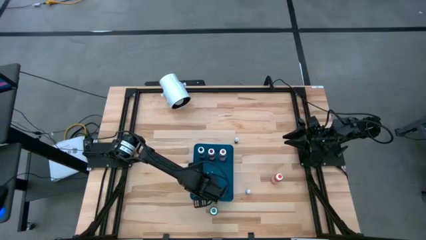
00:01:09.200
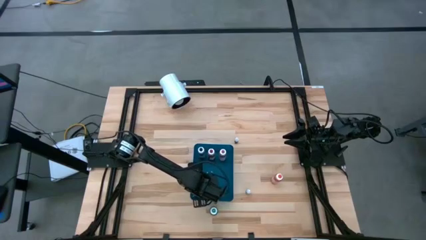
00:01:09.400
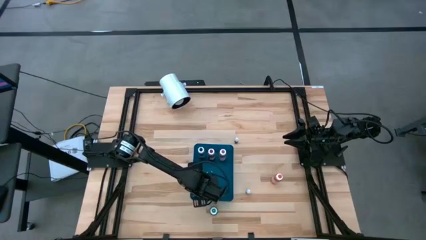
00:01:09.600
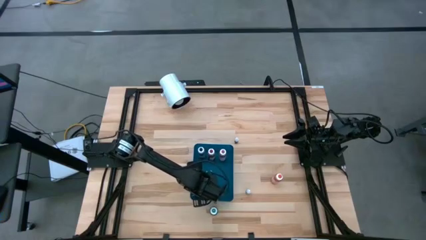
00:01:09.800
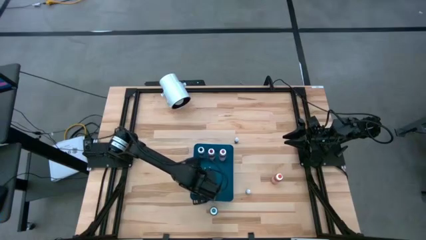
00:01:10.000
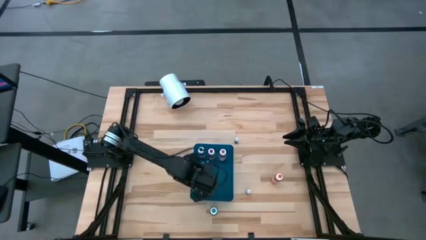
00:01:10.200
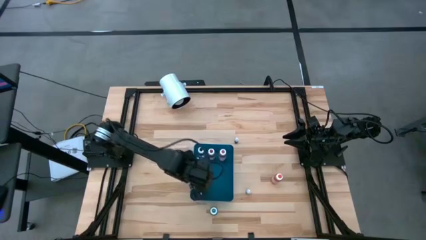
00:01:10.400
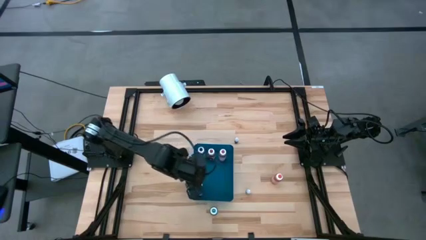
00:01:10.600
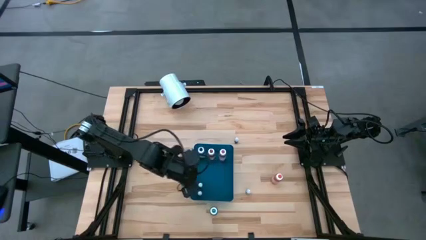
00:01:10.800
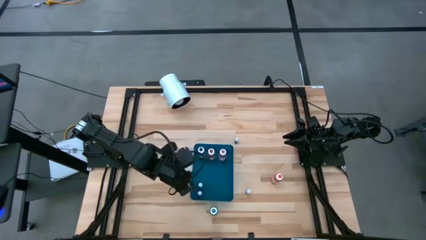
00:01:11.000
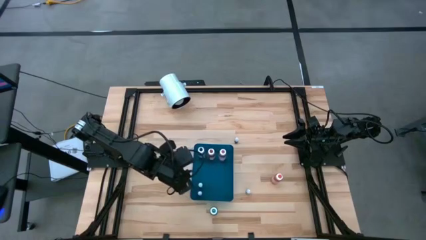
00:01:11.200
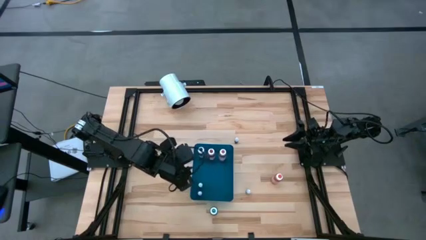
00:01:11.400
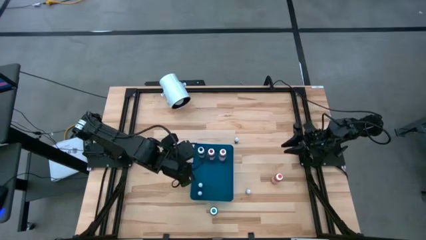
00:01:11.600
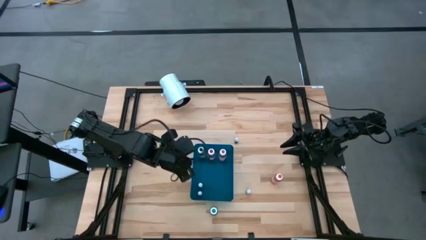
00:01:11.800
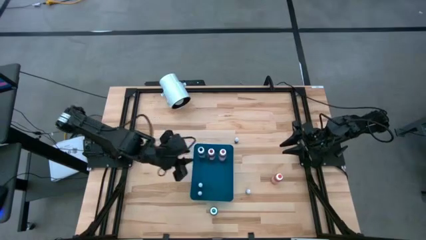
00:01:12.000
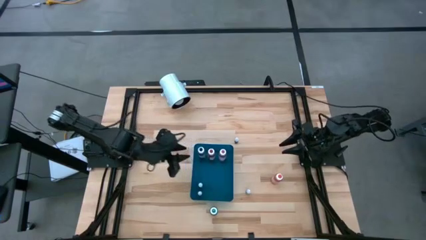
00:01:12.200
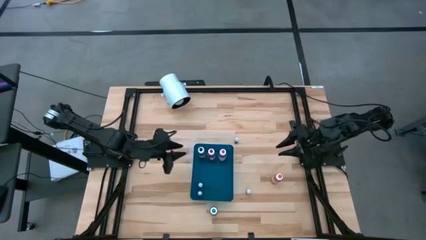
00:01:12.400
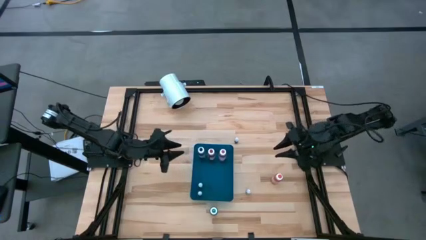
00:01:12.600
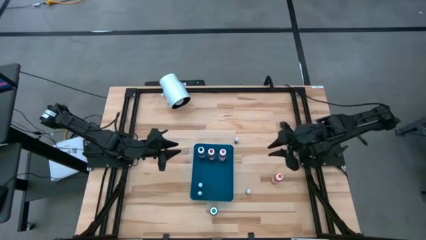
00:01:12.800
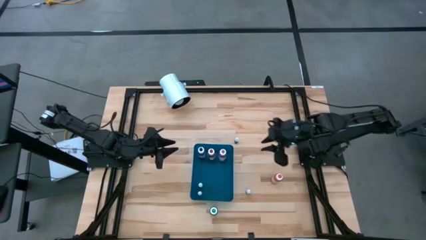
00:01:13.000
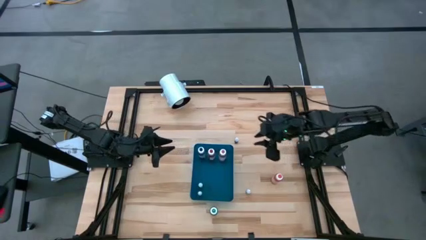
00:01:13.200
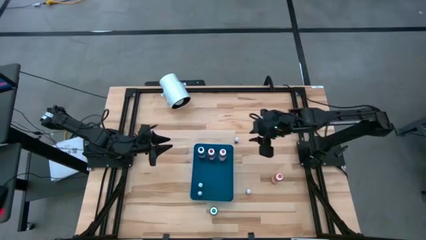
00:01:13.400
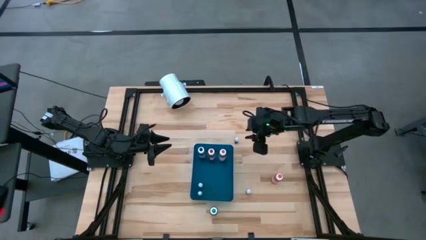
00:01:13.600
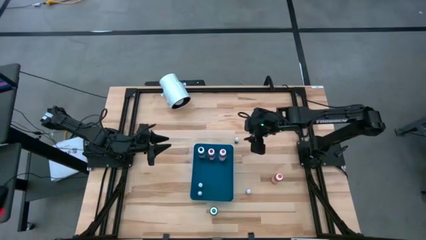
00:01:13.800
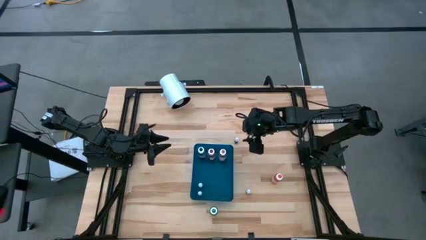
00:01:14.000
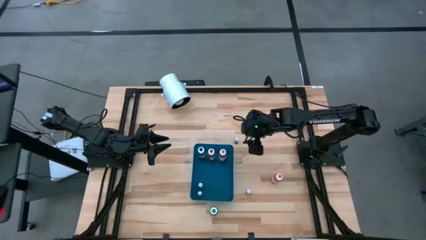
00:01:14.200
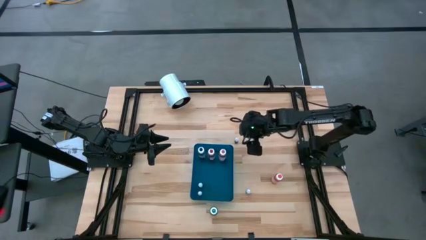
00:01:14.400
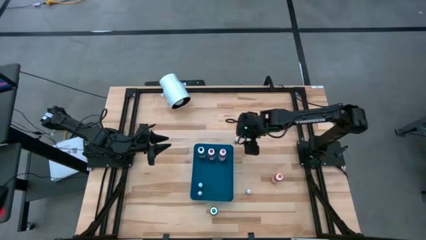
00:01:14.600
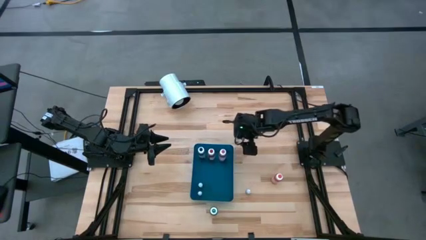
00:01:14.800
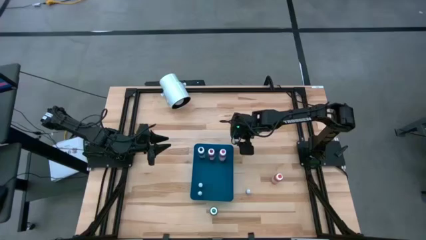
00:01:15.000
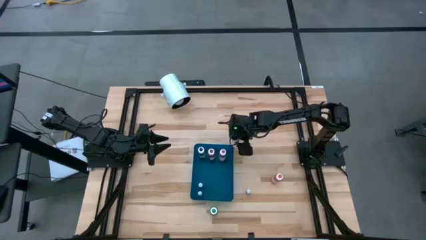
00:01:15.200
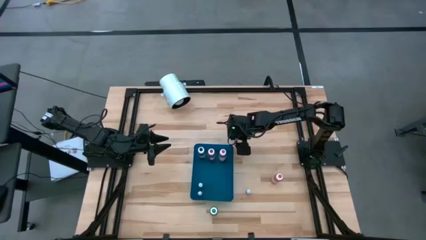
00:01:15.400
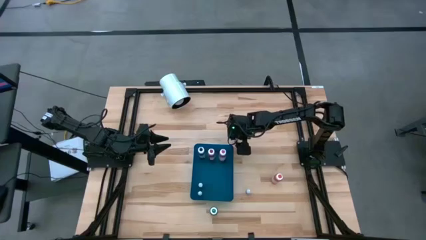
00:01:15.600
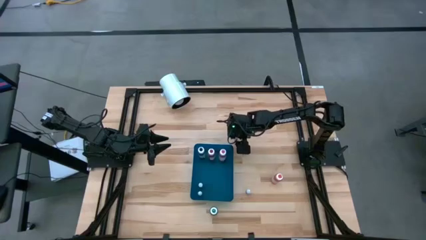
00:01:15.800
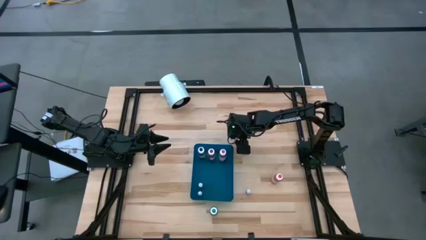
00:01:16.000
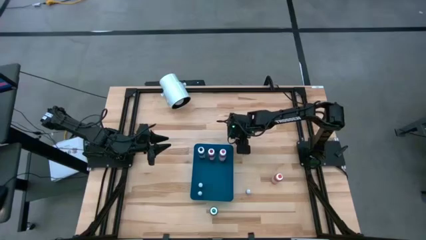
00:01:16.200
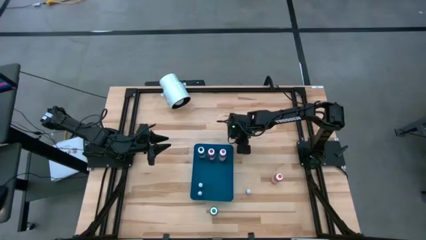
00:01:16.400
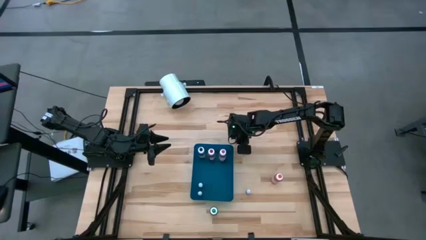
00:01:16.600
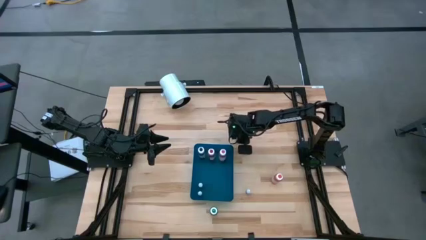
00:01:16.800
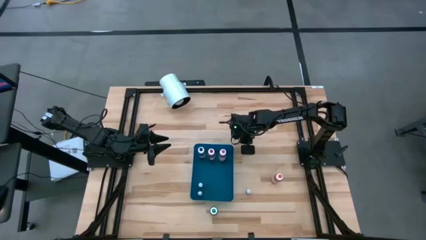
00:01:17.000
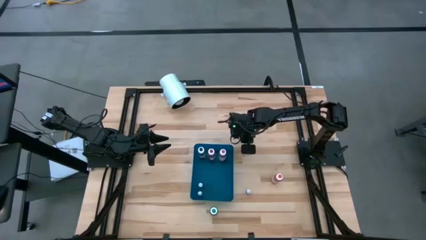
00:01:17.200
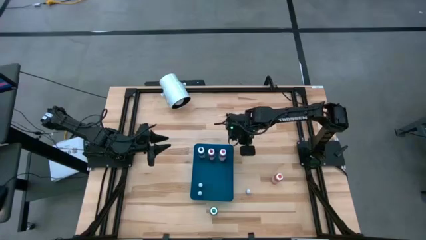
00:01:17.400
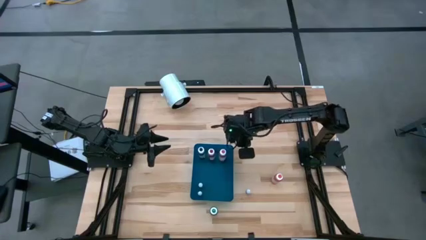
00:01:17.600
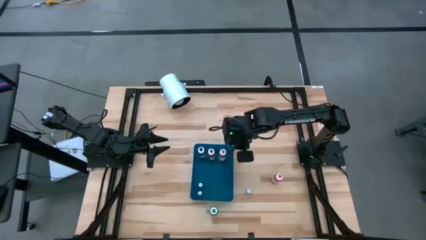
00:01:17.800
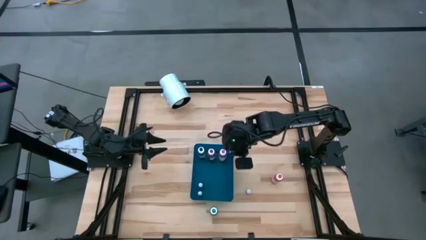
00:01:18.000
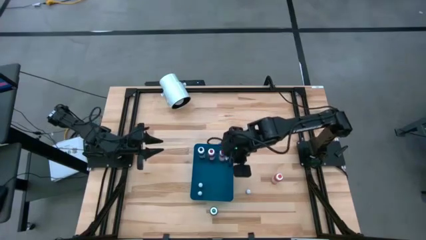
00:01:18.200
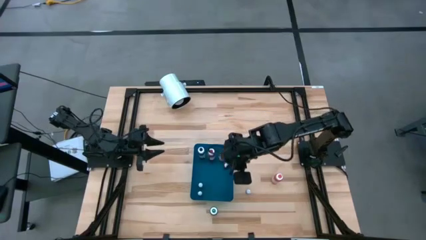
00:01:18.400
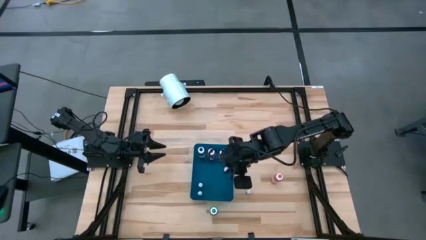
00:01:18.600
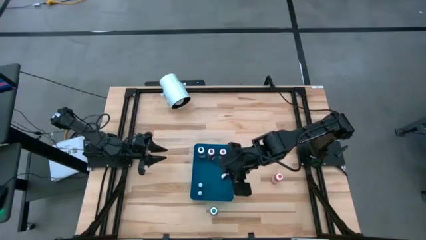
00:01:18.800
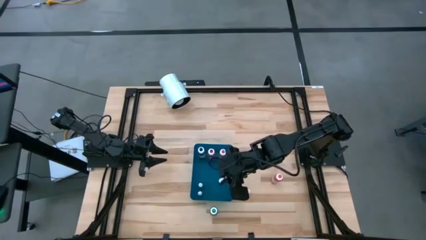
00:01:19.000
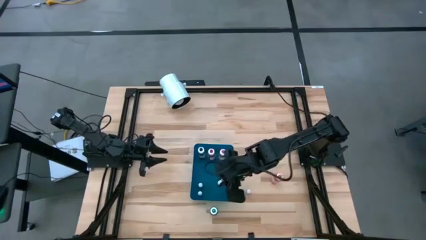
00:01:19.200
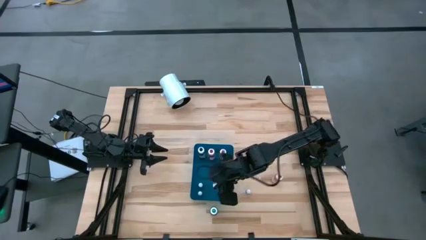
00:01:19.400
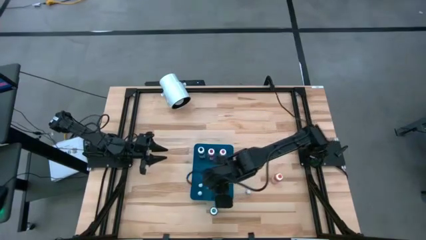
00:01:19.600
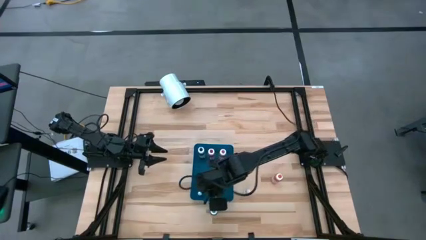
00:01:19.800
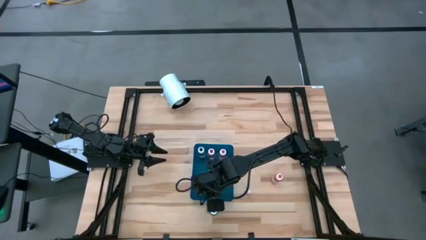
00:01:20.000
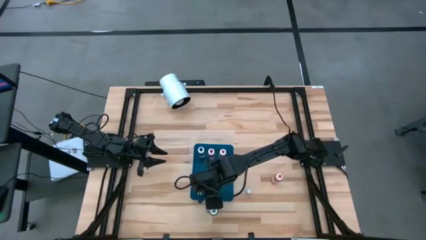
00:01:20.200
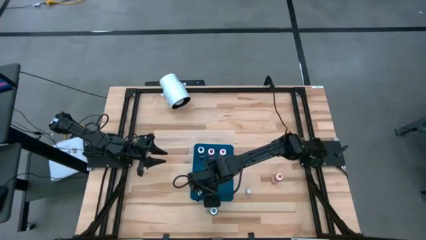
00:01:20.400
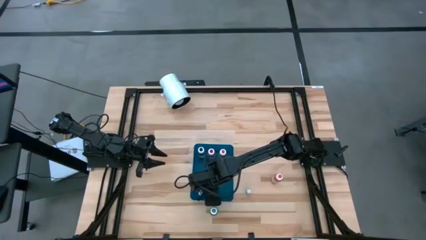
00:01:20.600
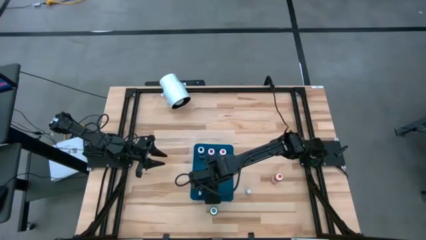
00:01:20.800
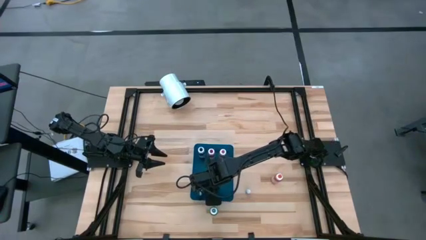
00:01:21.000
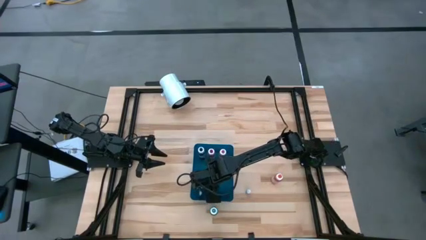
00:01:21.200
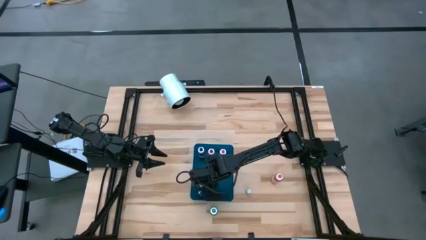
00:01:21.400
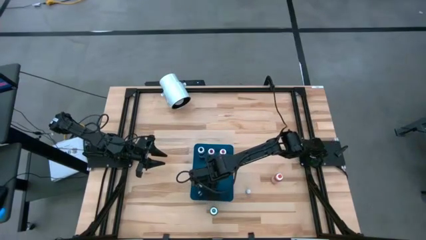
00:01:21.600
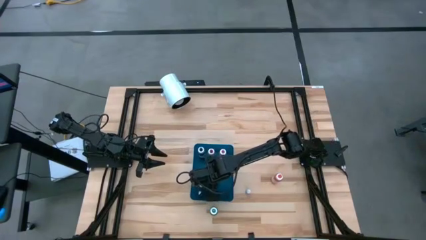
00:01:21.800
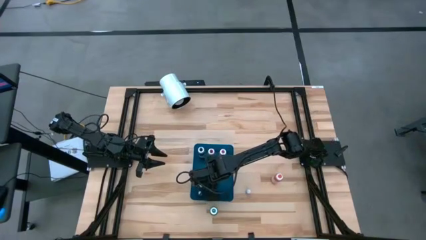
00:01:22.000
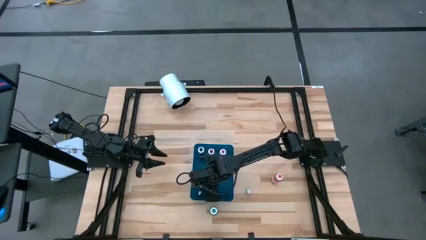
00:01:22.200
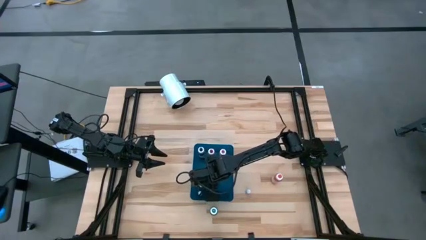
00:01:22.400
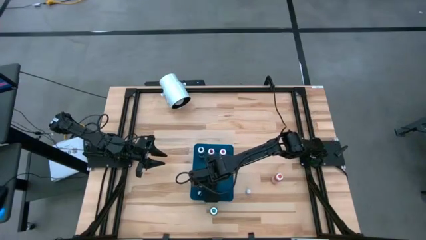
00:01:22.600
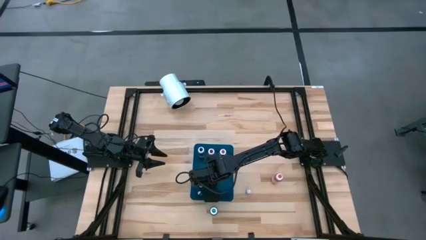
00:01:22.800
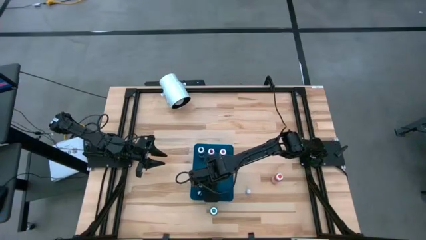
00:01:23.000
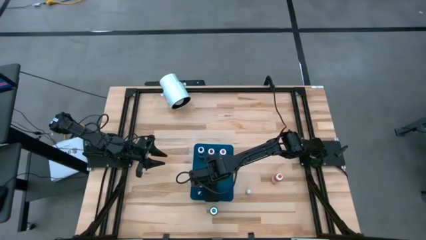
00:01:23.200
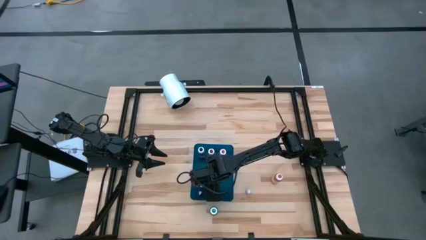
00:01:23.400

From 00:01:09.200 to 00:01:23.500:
Task: Pick & Place food coloring
Put the small green food coloring bottle into the blue bin
